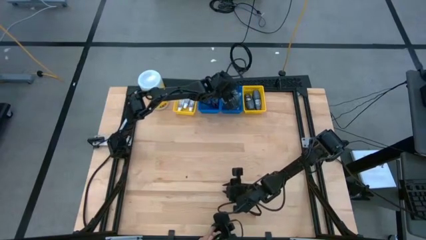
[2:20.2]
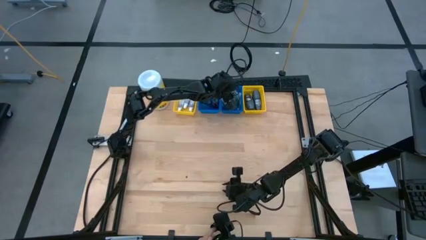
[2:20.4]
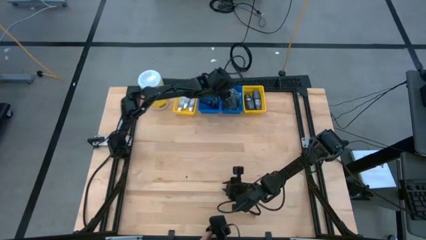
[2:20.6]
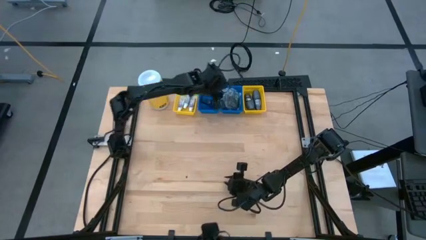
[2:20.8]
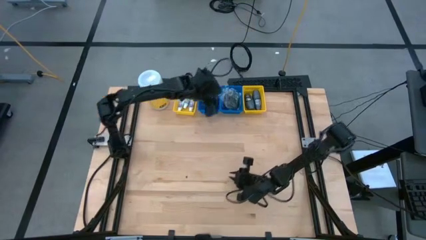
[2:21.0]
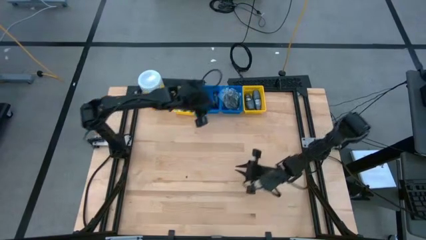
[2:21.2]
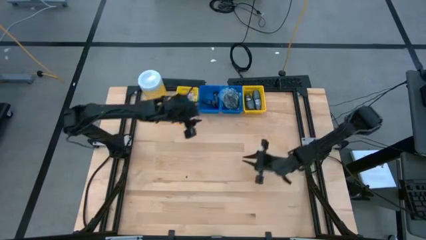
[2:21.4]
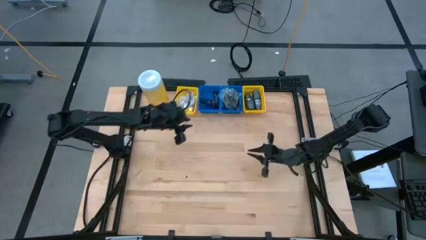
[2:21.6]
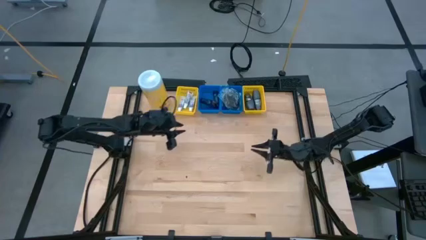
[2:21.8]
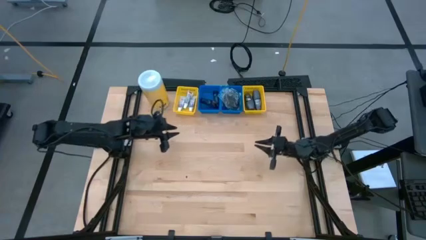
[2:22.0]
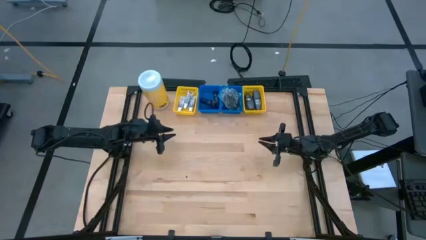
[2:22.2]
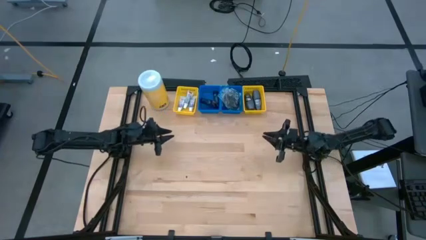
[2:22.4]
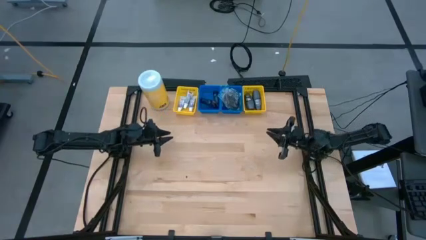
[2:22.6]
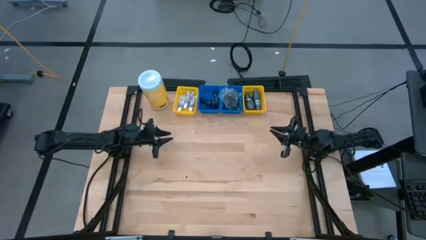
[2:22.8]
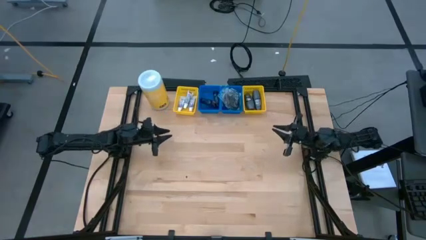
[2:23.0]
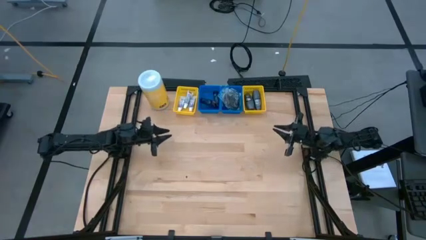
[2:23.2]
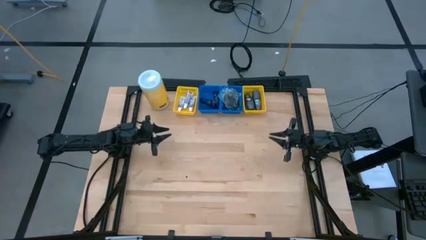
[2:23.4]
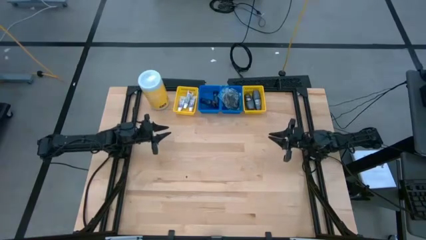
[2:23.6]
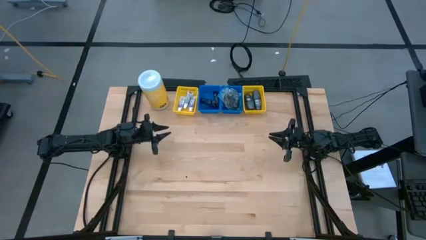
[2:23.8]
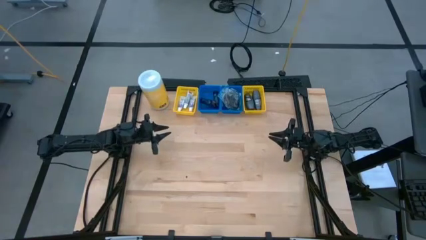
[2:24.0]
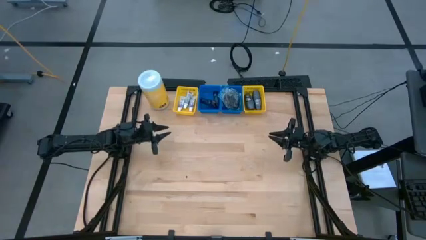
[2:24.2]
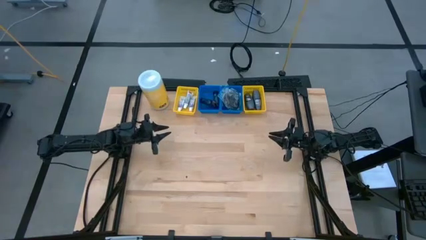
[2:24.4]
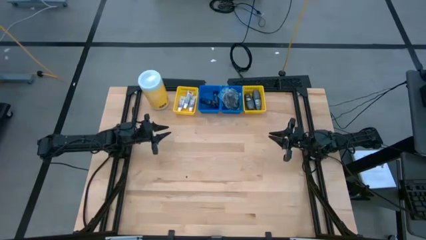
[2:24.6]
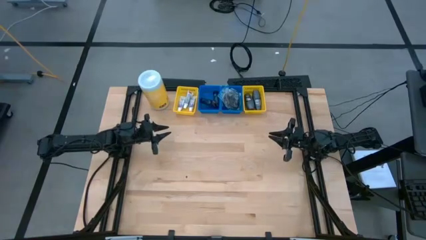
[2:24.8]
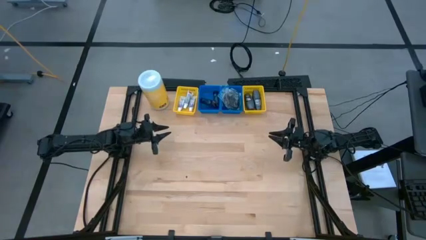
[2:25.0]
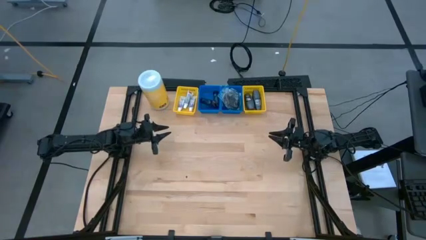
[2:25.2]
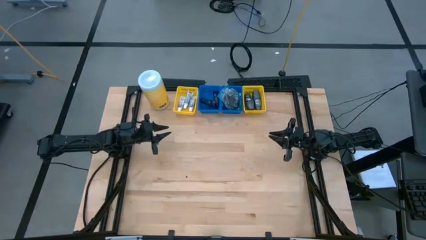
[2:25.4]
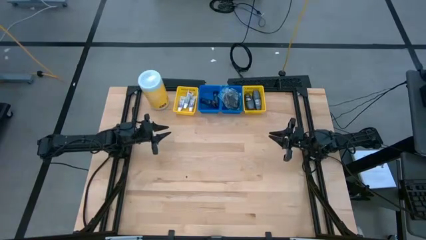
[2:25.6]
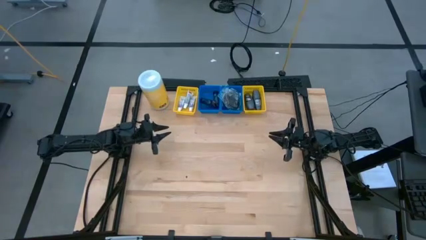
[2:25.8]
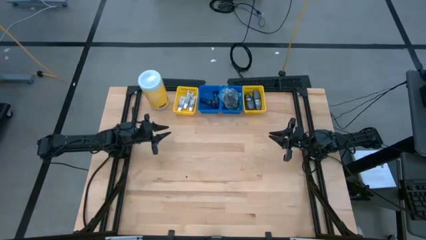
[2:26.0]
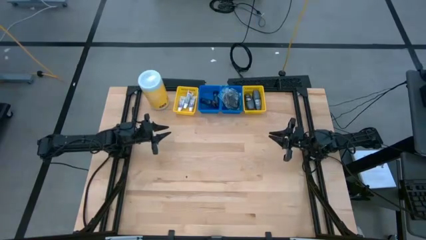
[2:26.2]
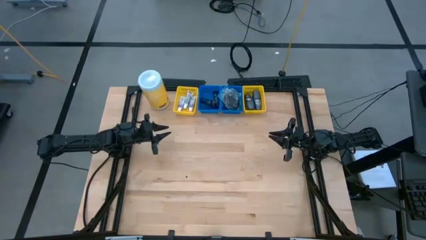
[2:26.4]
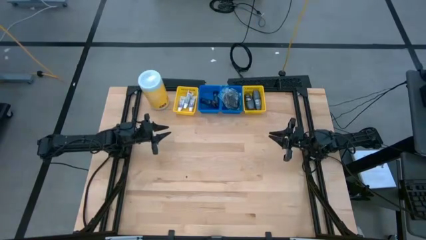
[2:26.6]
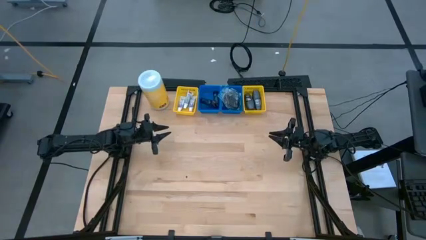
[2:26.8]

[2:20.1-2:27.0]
Task: Pick & Place Travel size toiletries
Return to Home Position

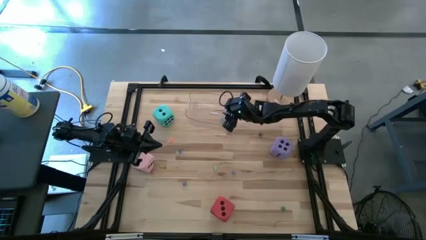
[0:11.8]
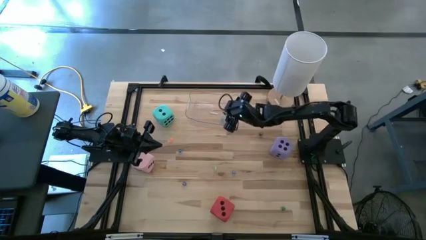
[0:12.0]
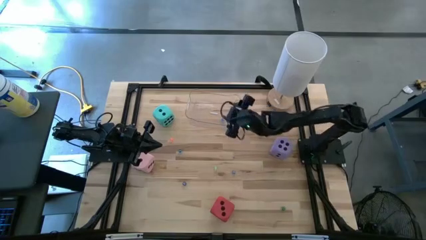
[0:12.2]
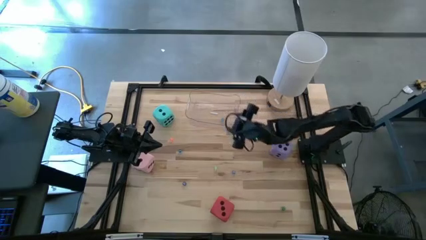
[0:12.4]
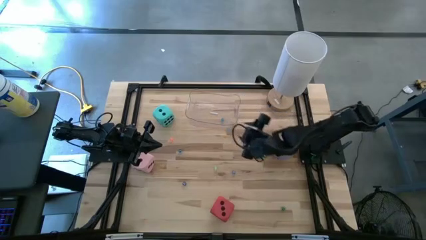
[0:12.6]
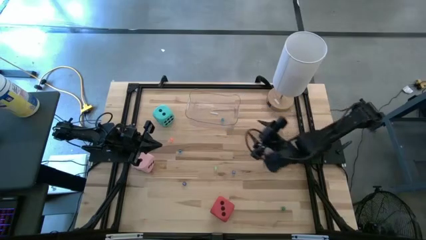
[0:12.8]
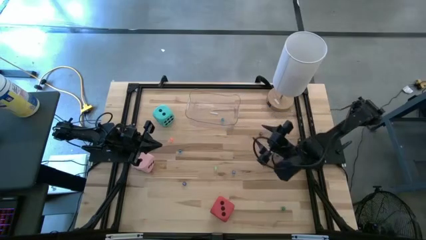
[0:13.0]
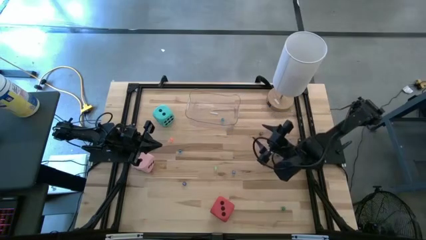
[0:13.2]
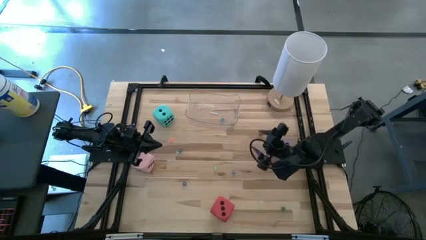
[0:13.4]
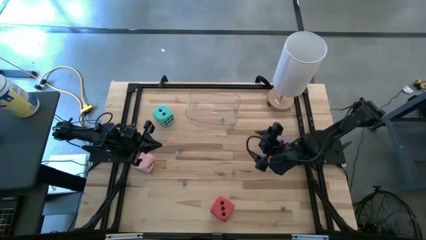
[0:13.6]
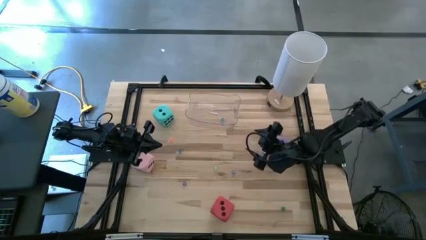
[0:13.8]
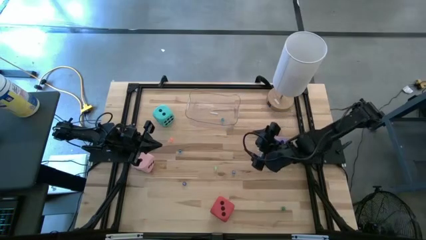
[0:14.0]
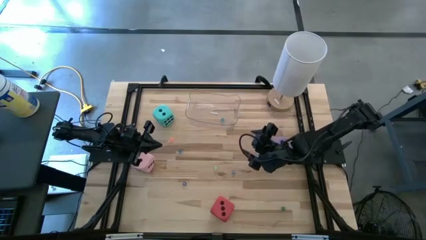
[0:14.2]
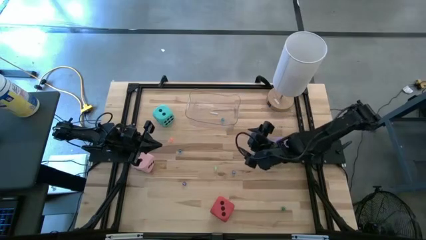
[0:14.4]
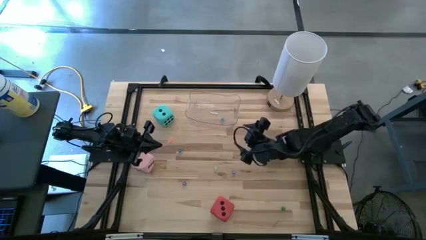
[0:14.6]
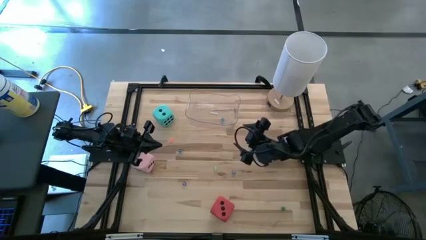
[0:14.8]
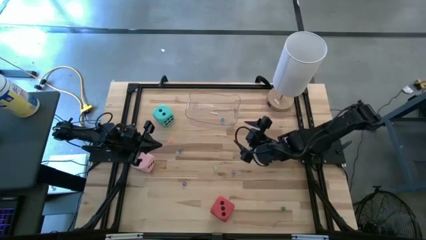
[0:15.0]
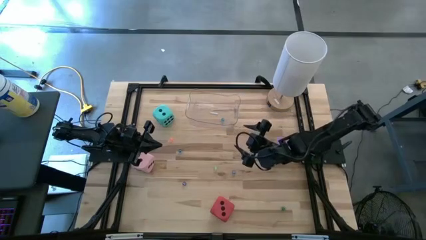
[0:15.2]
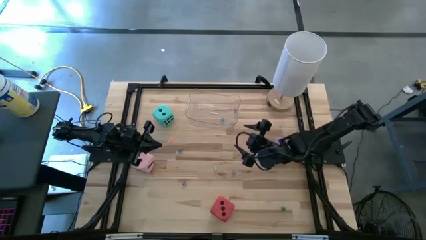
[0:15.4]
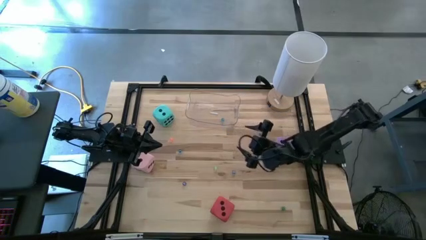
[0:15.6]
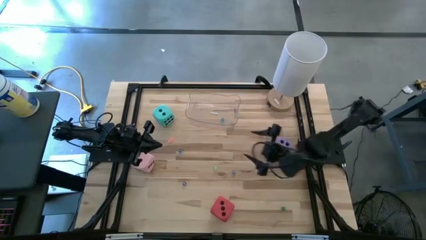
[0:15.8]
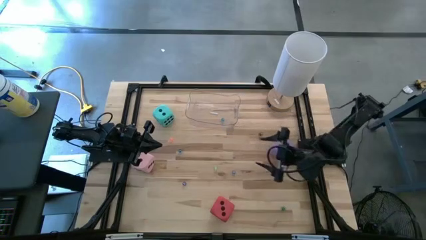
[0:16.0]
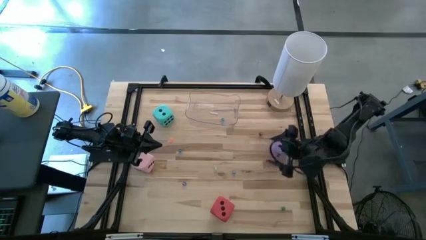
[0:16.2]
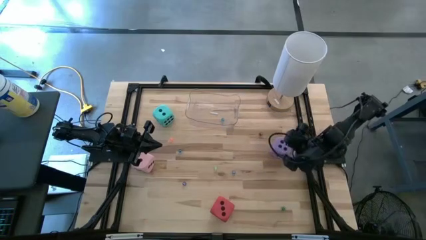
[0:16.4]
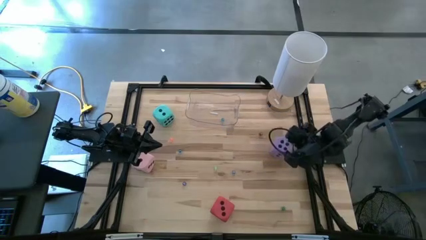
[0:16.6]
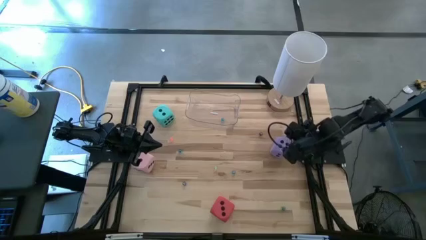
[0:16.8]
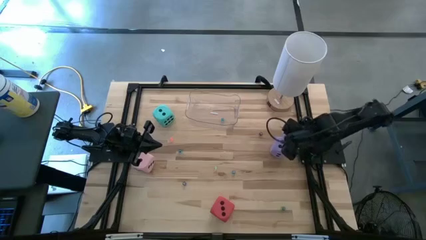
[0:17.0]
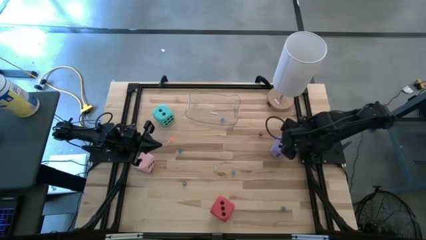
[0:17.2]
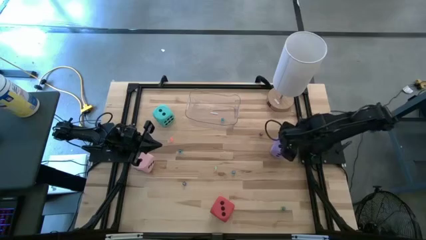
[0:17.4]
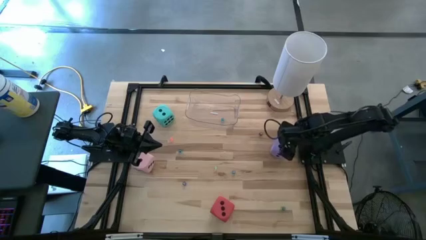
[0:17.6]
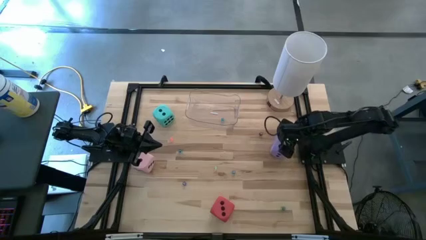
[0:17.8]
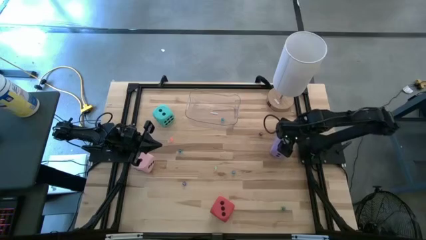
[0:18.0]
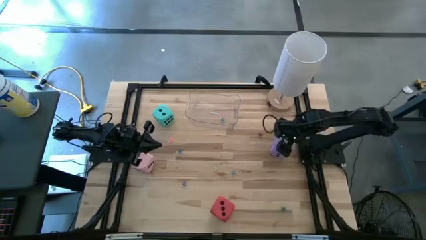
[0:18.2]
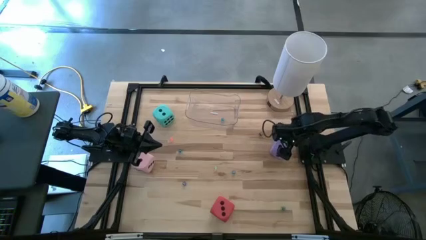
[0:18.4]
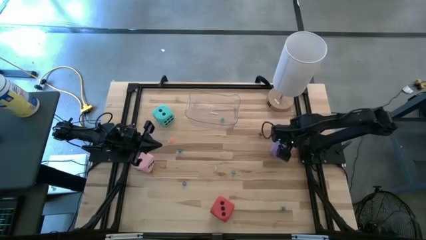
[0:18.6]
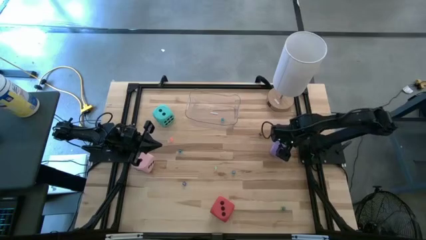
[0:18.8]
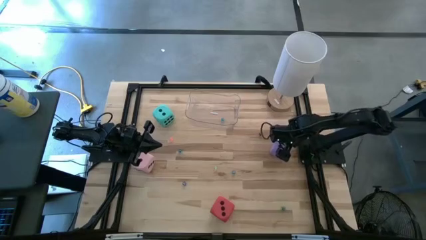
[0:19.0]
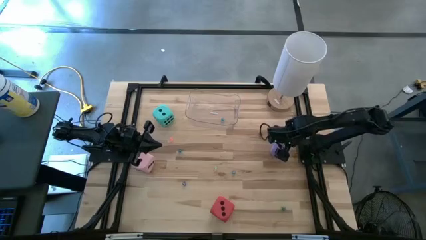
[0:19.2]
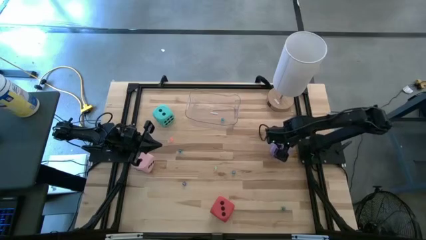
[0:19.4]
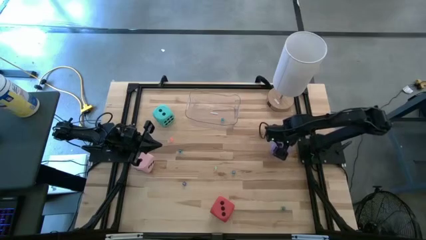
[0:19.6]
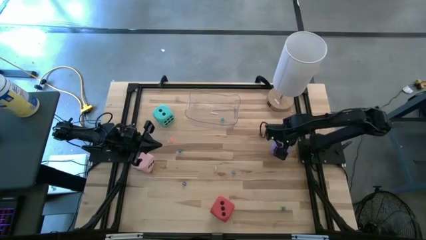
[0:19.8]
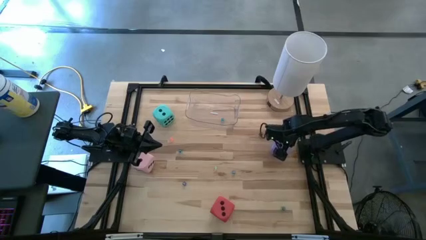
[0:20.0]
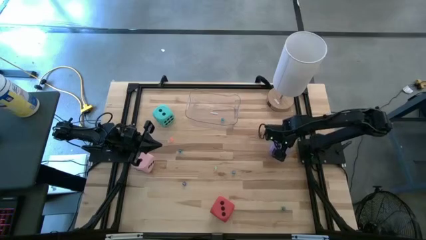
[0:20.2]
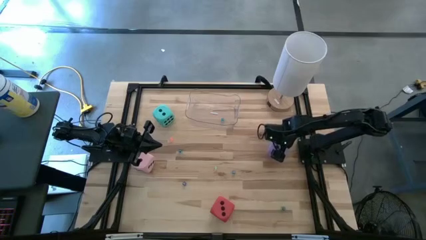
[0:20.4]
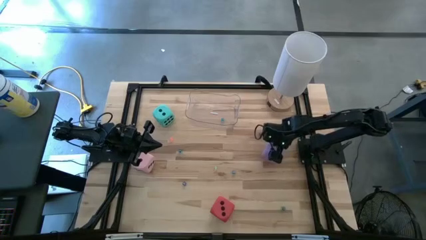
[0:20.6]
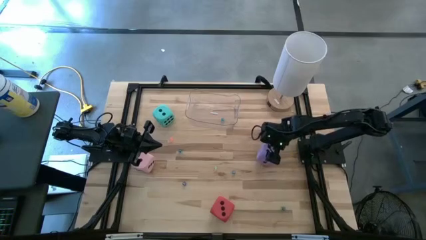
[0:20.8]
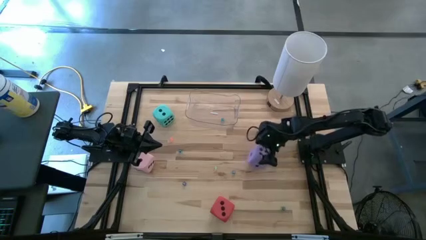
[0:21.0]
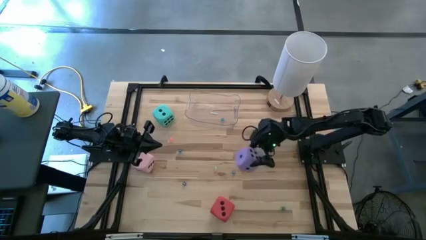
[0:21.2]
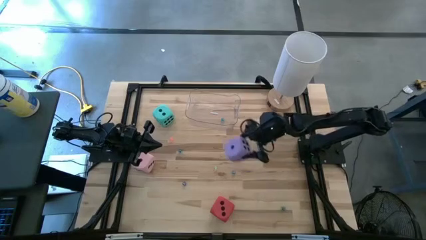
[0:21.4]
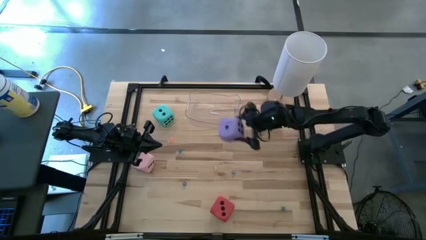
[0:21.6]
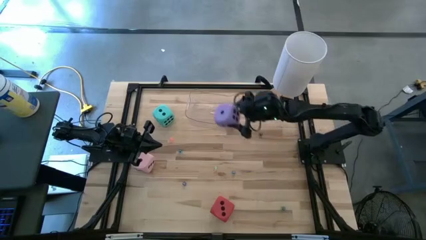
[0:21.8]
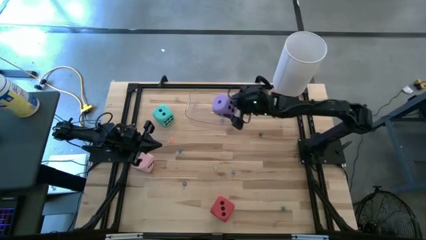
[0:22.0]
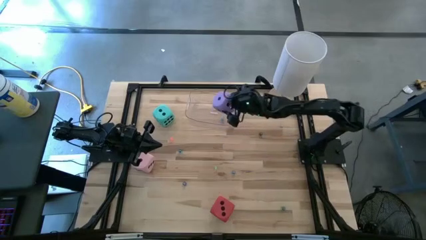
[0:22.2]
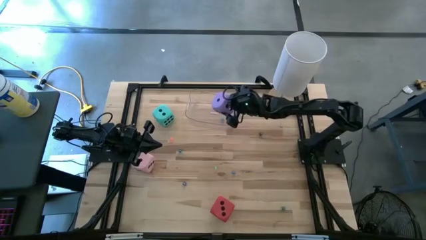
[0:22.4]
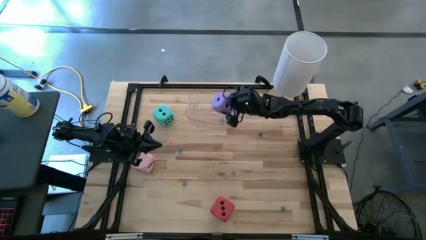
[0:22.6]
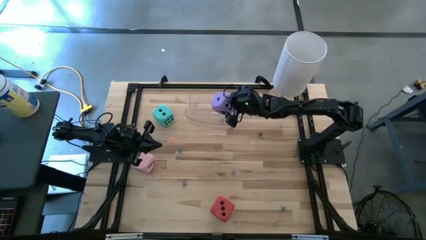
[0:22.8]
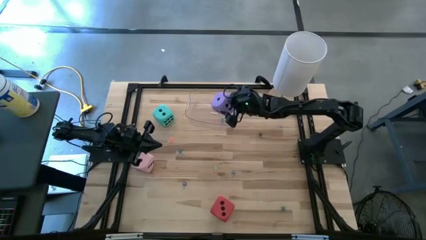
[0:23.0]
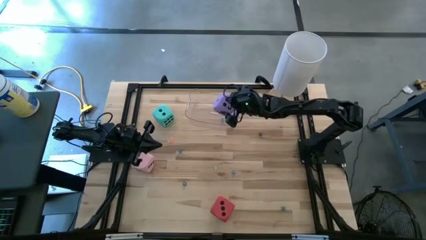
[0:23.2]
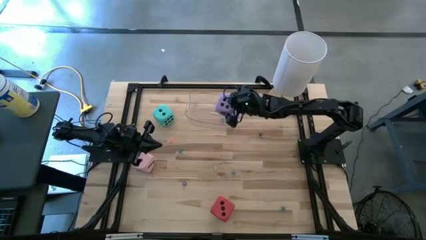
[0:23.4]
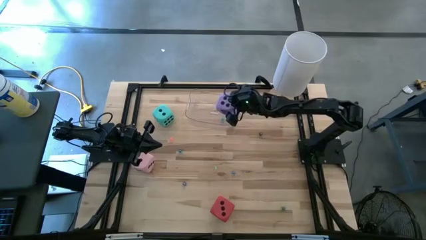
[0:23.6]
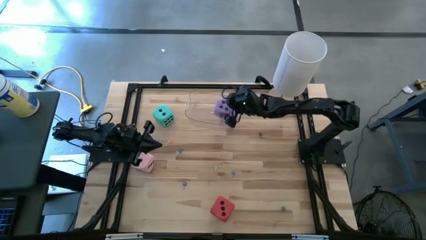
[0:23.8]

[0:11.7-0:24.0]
Task: Pick & Place Dice
Put the large violet dice into the transparent bin
